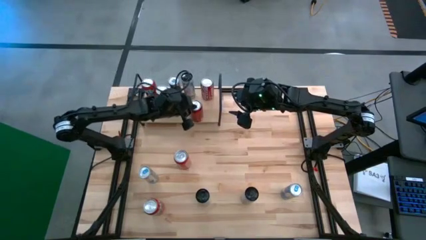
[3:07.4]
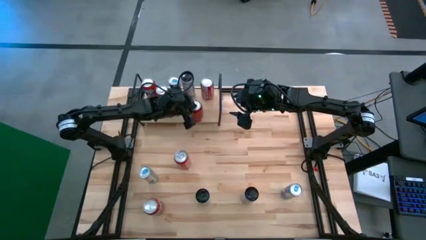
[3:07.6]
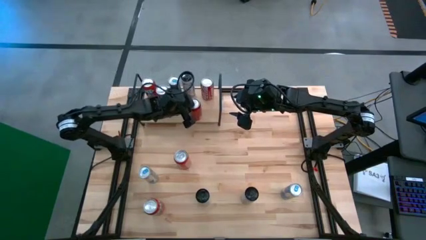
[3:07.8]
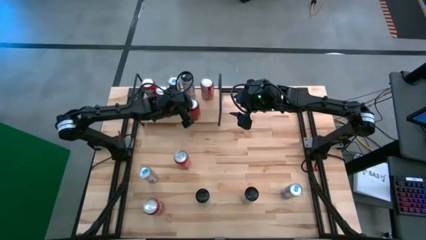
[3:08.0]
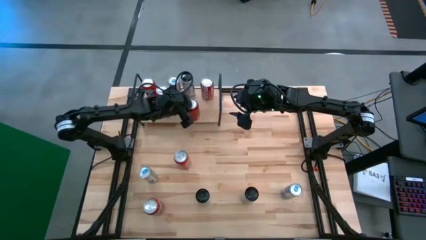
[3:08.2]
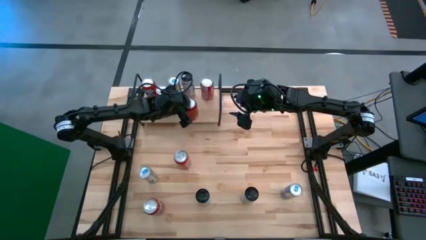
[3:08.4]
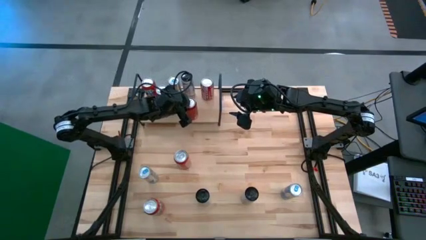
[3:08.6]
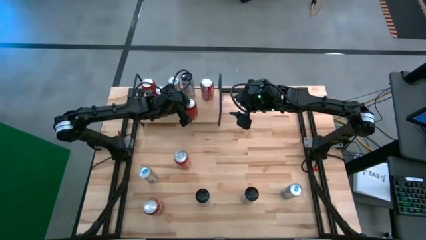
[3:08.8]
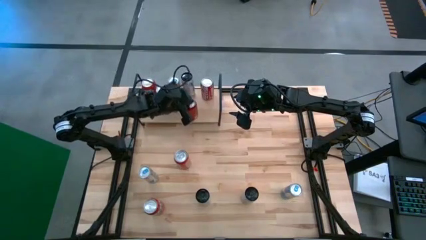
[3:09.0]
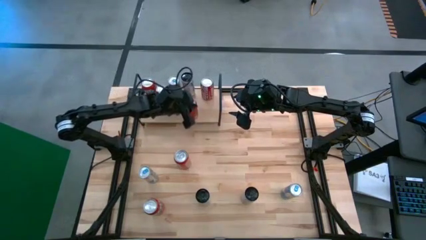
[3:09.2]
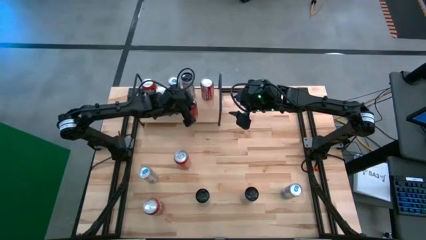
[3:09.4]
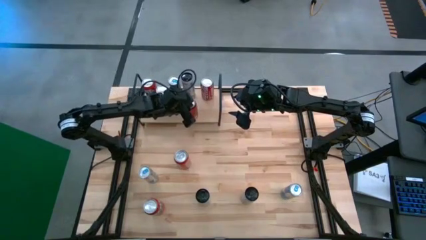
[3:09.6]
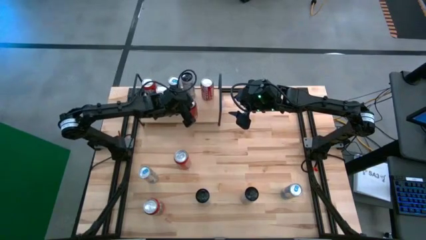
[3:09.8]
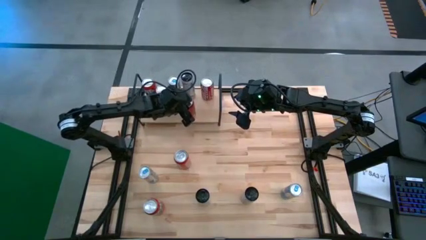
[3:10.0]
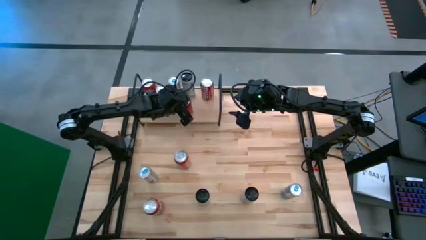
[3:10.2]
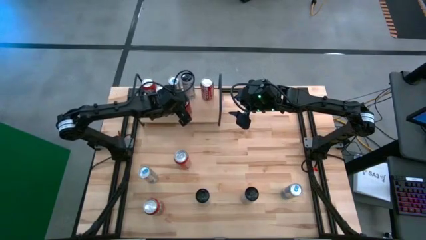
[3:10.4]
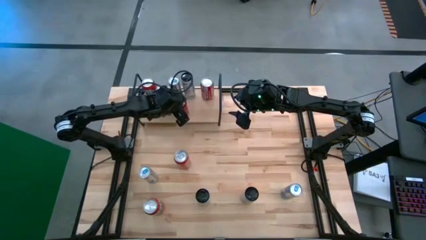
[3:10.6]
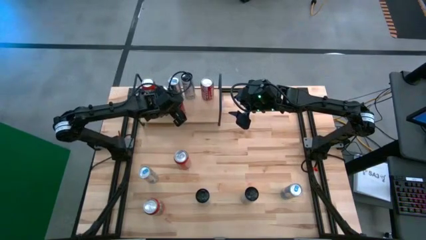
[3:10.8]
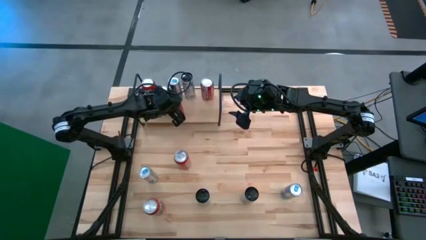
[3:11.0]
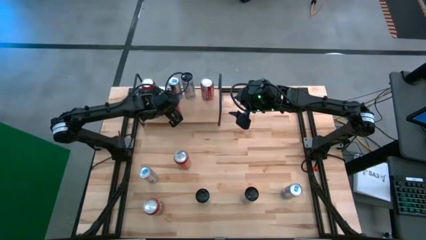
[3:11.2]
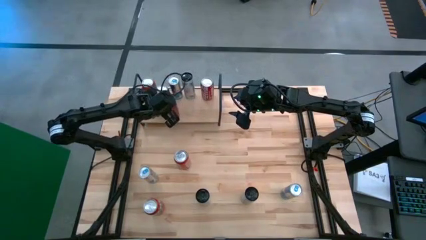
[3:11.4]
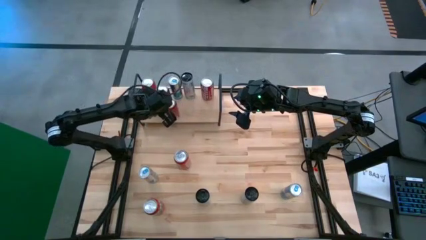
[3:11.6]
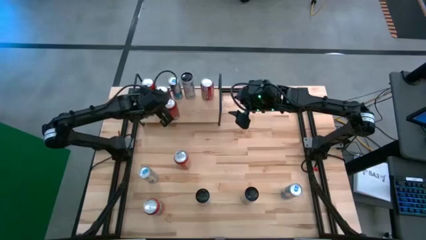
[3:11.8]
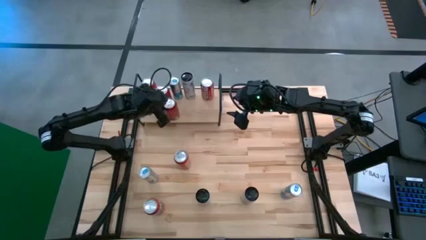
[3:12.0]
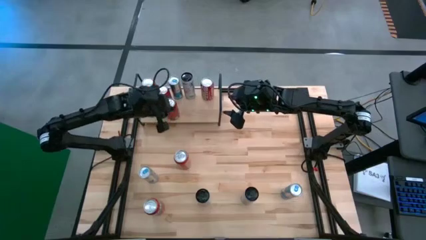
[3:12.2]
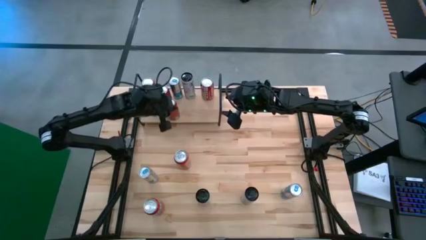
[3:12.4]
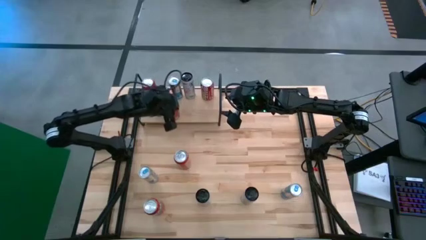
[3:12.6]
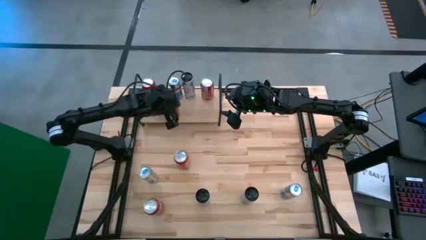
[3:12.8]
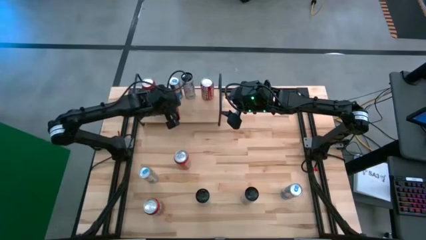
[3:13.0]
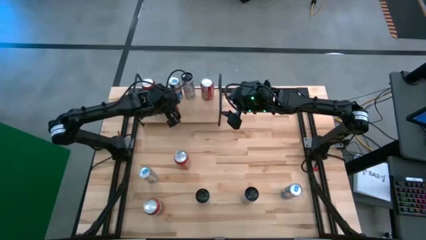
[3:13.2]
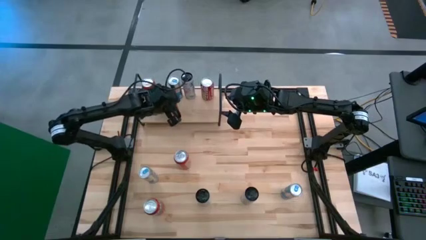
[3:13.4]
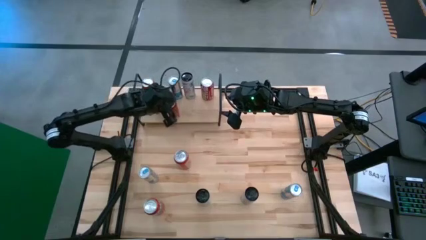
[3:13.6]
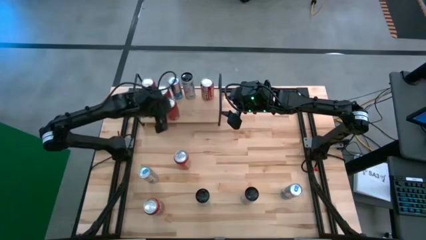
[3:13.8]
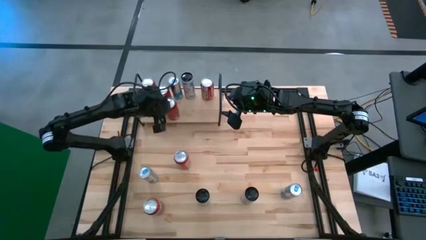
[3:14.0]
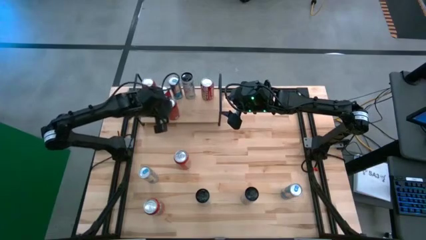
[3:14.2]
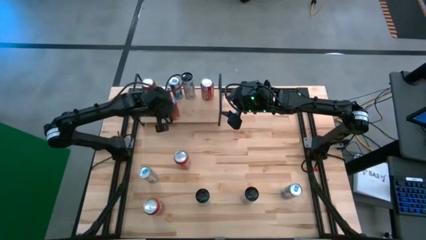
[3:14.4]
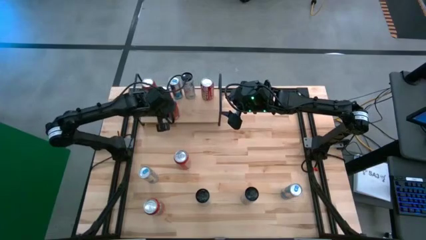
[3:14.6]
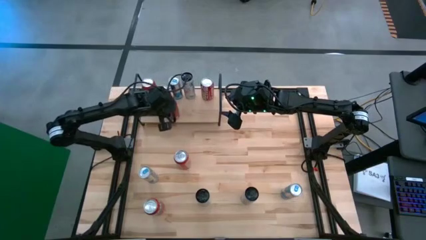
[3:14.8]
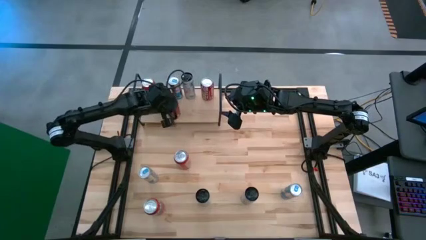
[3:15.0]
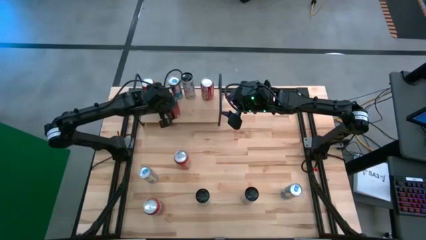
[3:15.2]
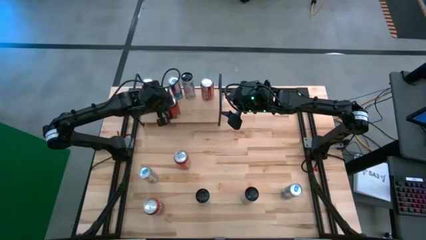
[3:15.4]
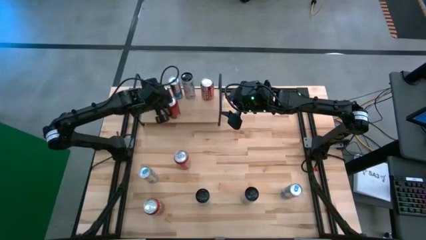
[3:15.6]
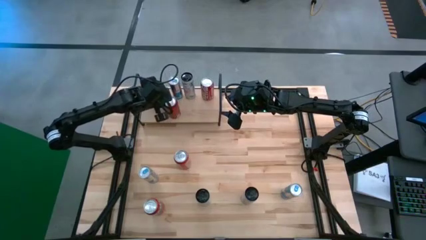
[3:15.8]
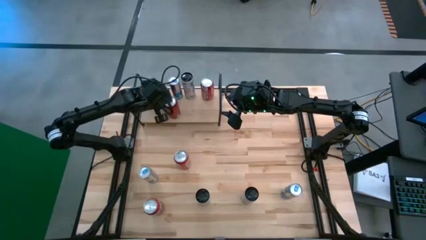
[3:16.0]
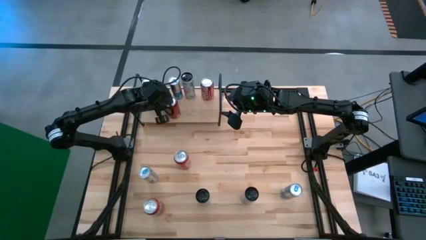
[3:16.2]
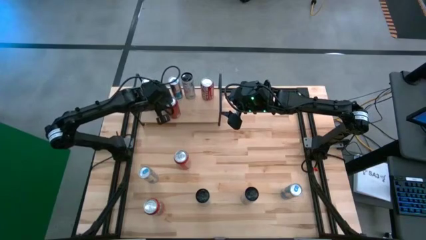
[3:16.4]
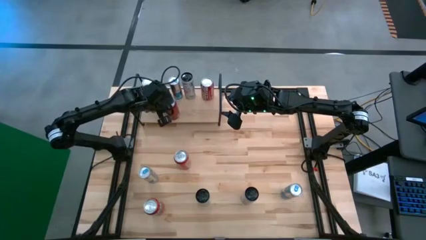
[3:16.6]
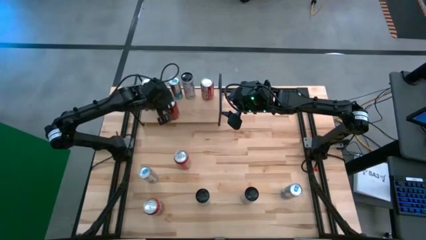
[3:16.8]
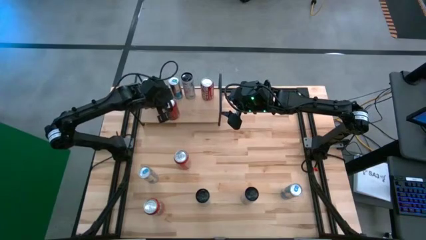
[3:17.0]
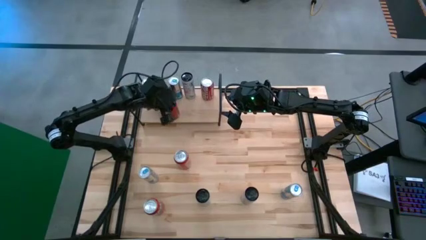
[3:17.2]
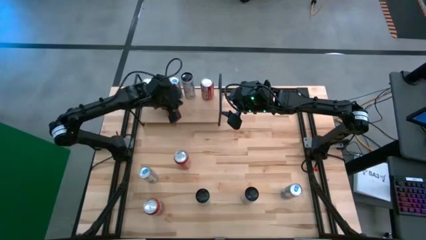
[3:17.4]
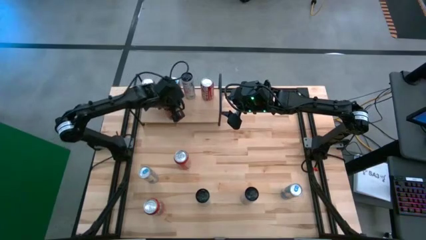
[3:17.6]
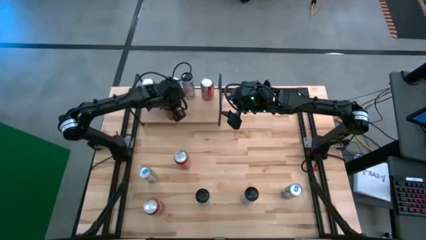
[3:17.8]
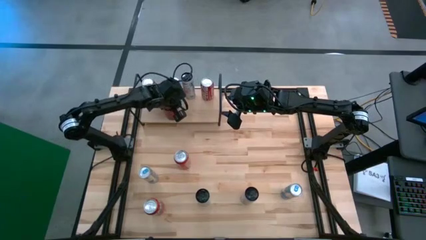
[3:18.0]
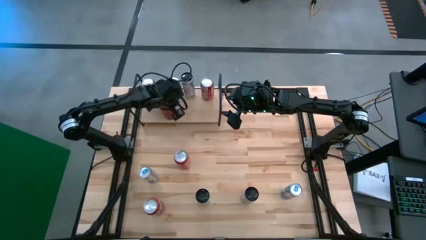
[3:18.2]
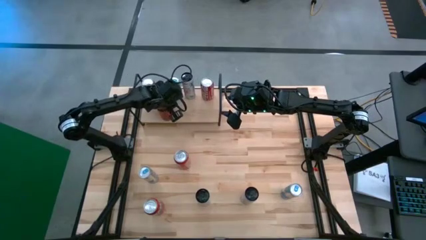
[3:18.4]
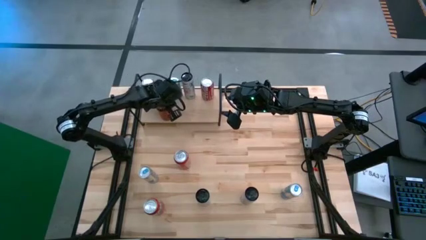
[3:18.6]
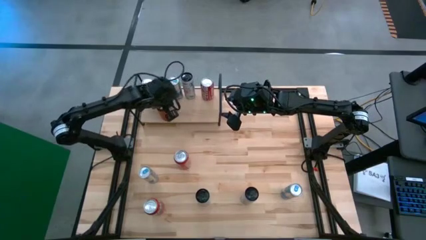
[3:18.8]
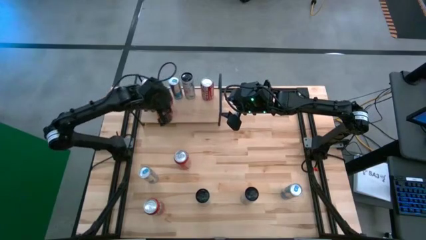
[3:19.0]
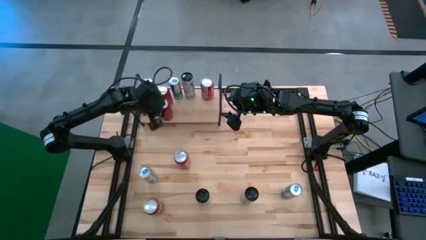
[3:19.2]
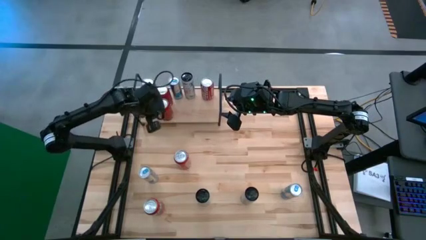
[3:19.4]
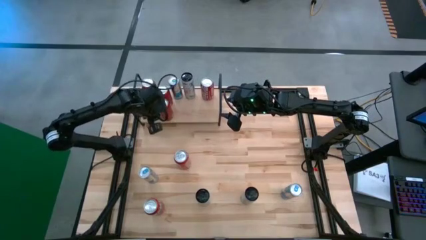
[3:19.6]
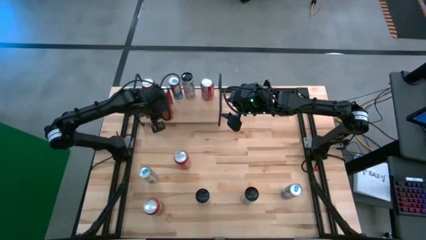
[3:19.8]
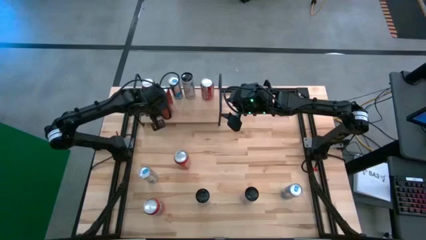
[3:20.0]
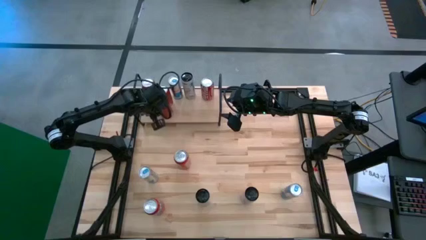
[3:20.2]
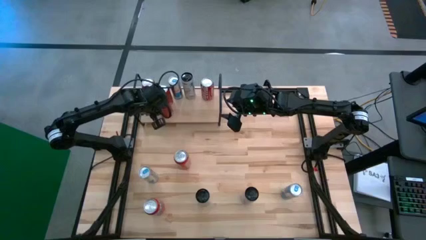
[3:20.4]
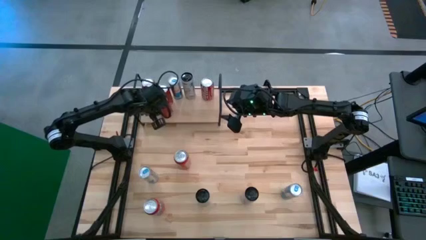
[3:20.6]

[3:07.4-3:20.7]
Task: Place canned beverage on shelf
Put the red black soda can on the shelf aligned with the other red black soda can
